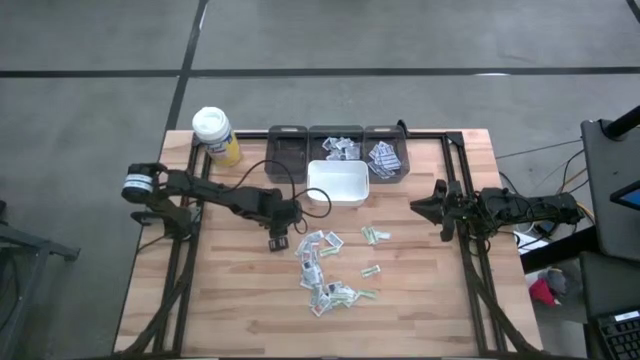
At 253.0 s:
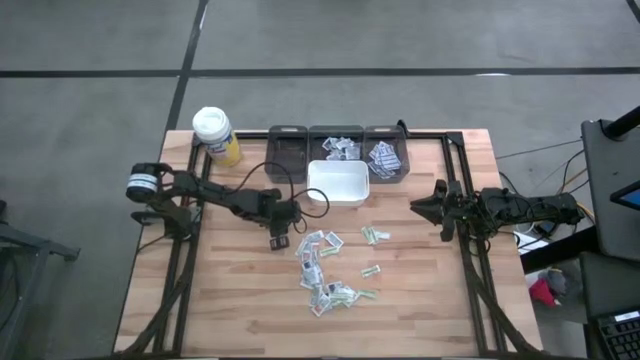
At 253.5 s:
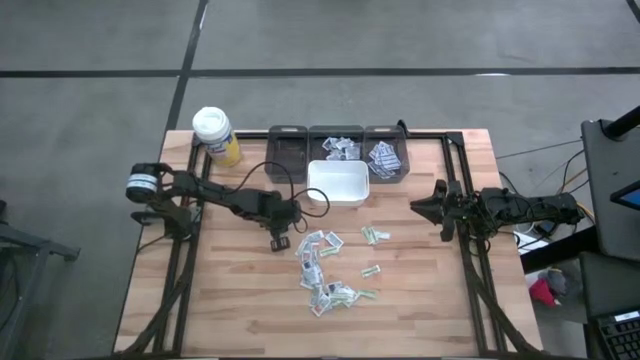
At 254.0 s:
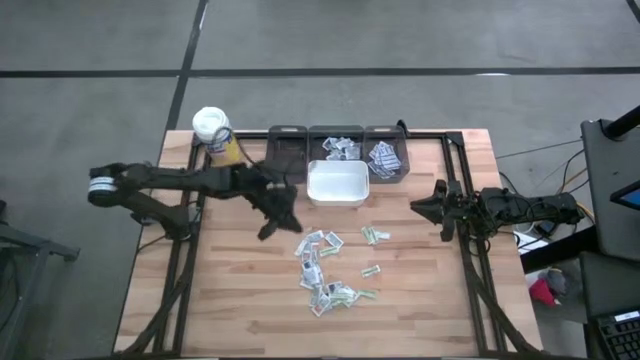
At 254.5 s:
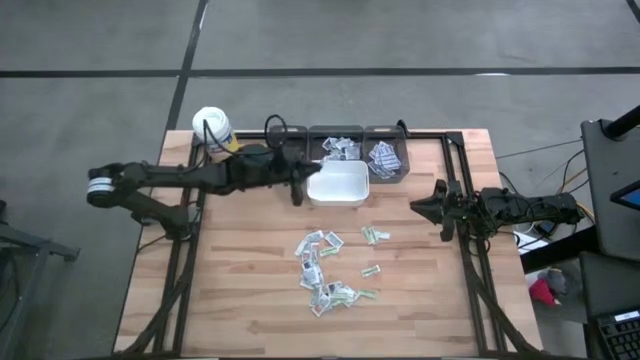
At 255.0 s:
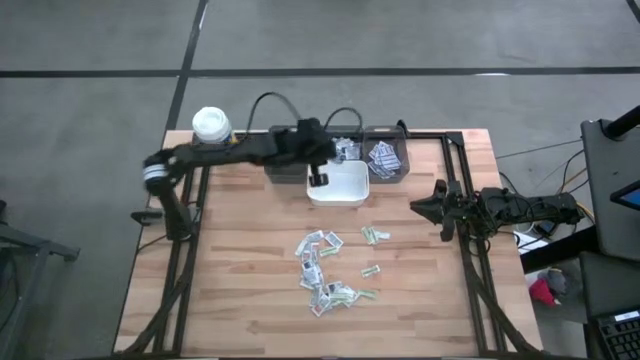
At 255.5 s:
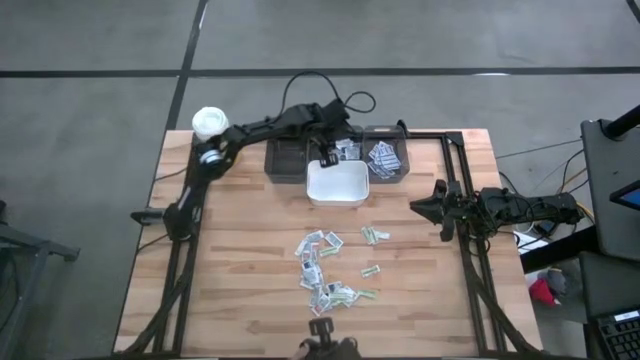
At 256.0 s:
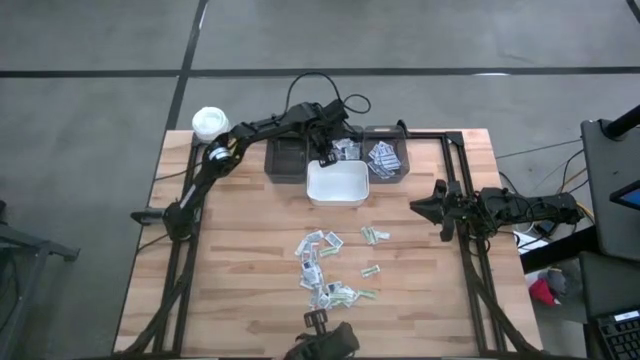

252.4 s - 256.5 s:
Task: Pick & Place First Aid Supplies
Put the alcohol pad into the middle black bin

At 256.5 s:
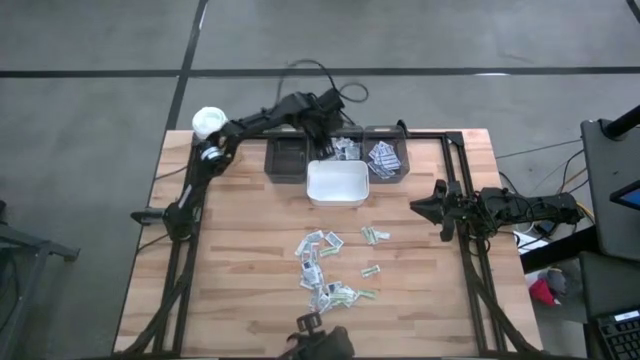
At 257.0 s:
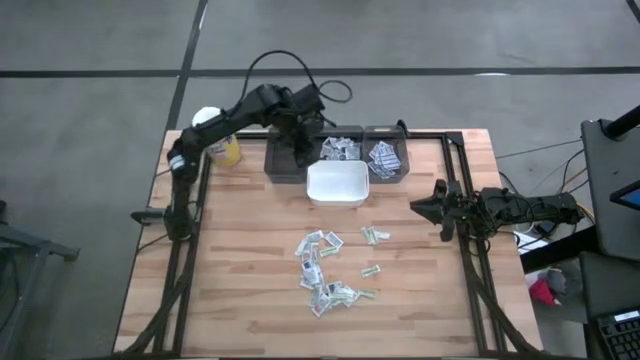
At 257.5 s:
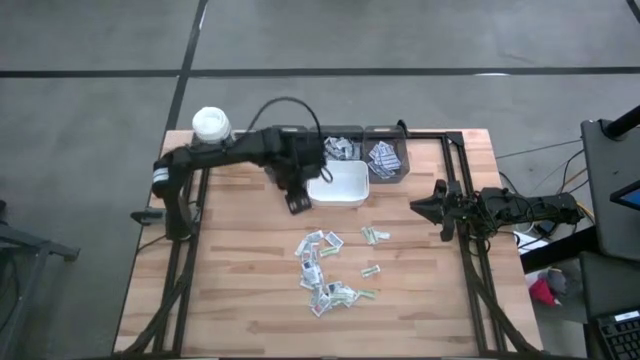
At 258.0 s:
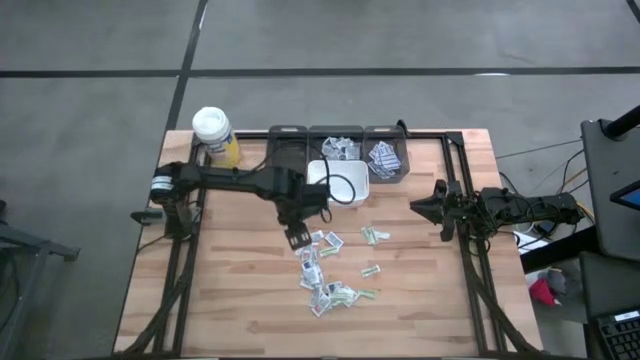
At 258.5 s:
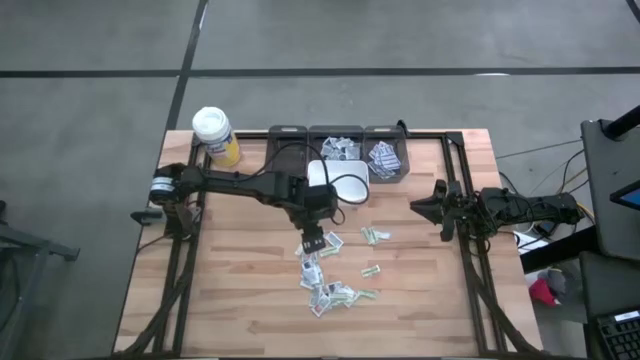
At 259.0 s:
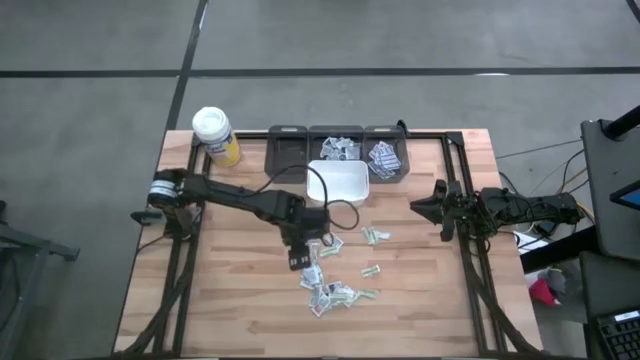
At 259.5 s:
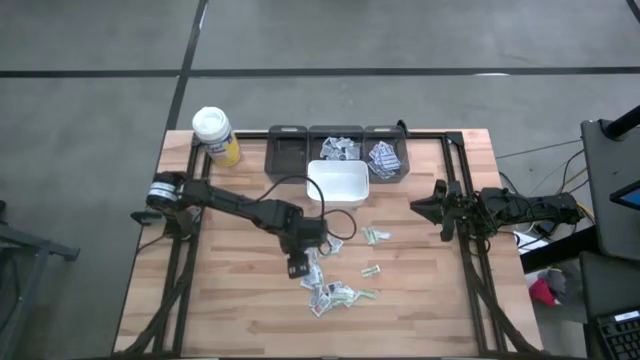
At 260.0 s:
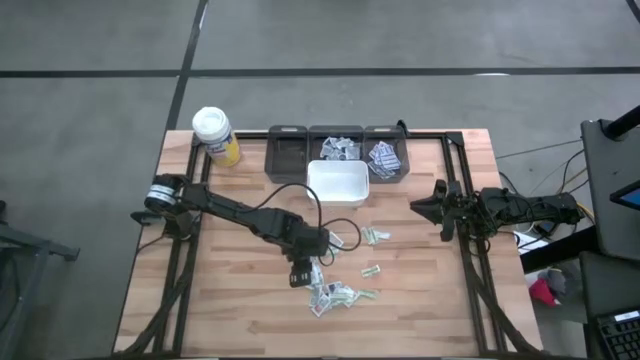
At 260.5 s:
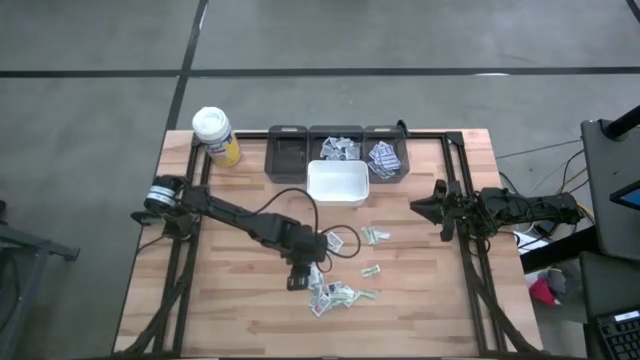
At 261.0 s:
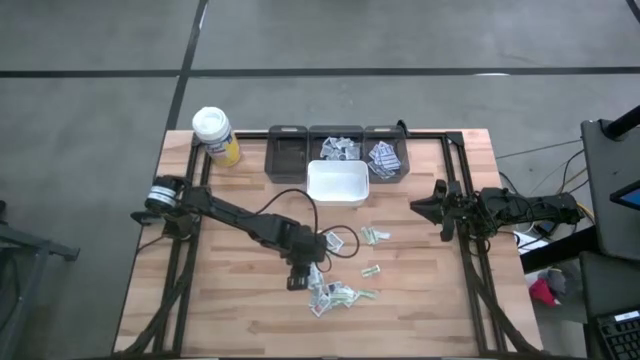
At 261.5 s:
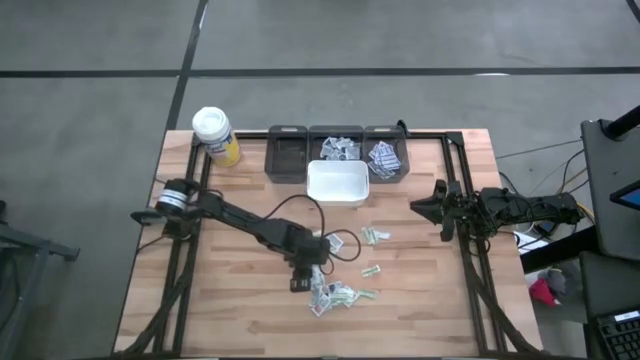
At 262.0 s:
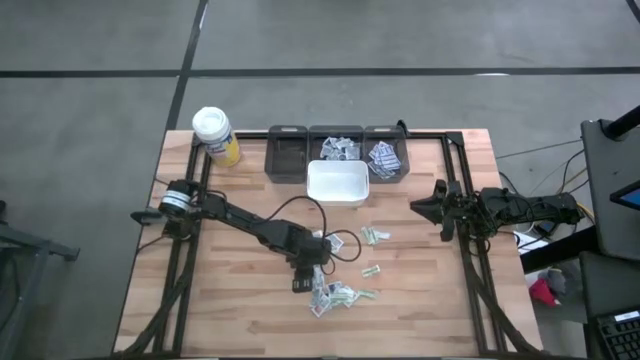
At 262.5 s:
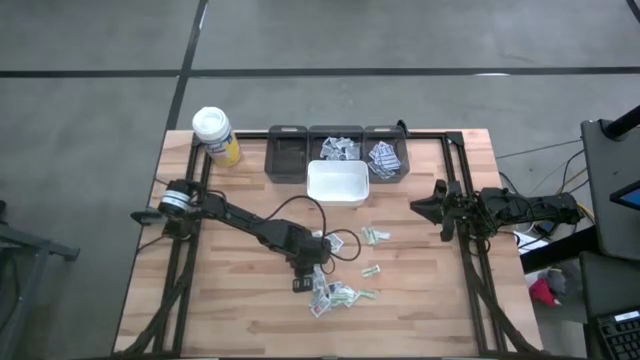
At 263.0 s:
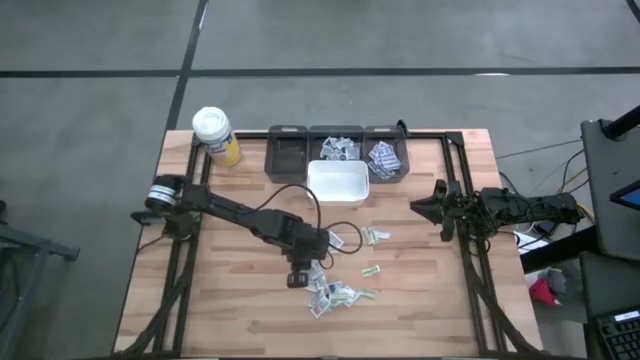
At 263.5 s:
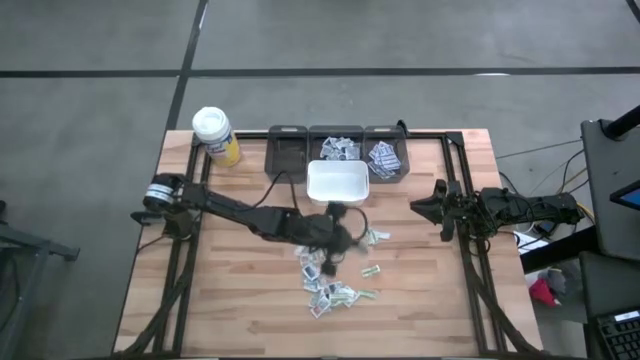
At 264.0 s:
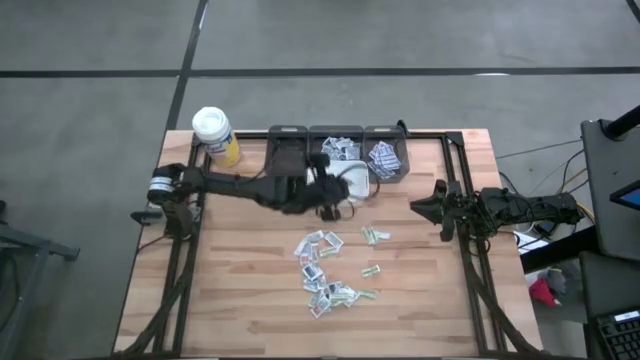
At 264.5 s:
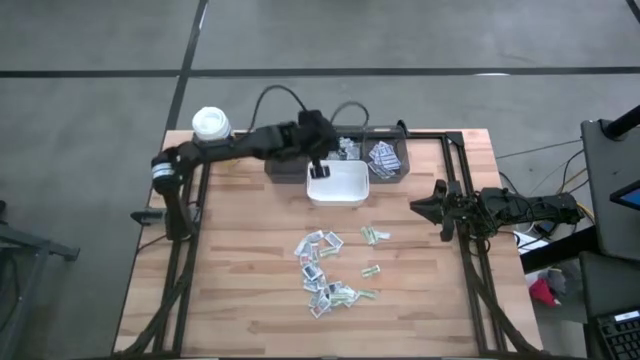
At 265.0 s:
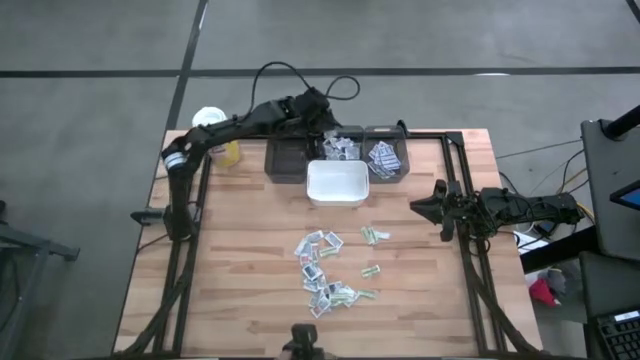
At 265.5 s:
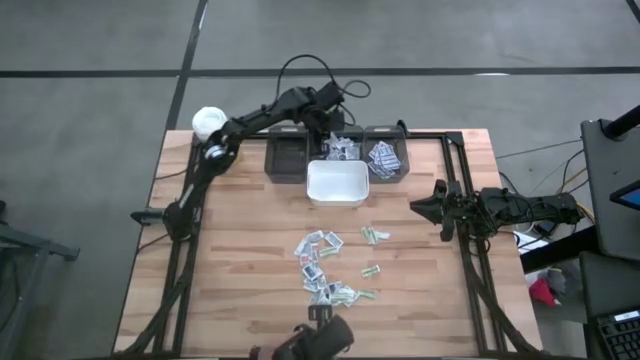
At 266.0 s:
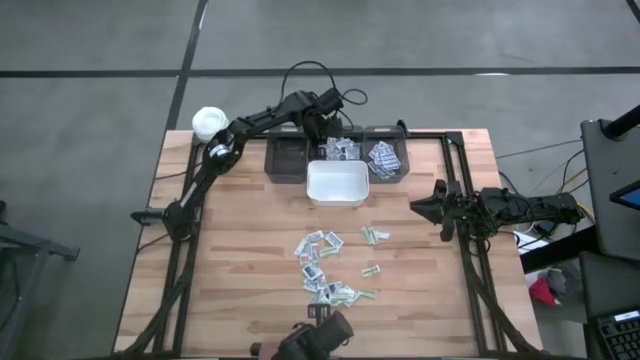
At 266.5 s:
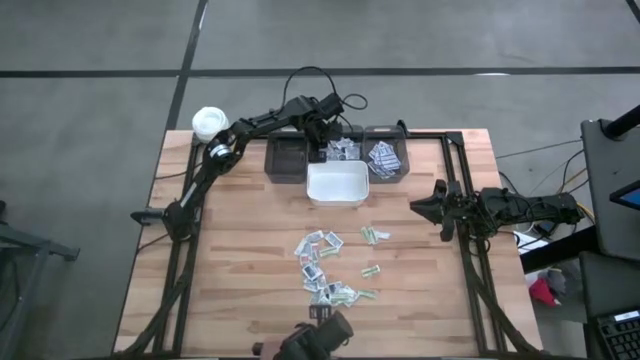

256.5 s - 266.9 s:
Put the alcohol pad into the middle black bin

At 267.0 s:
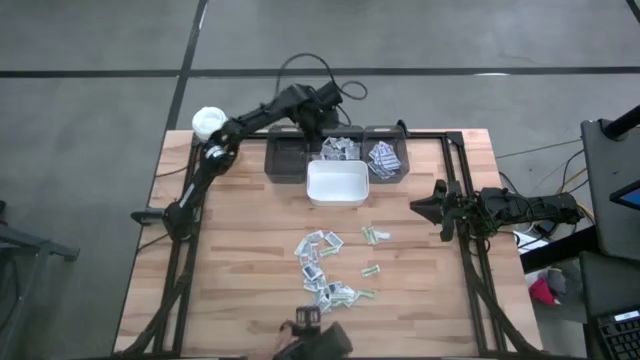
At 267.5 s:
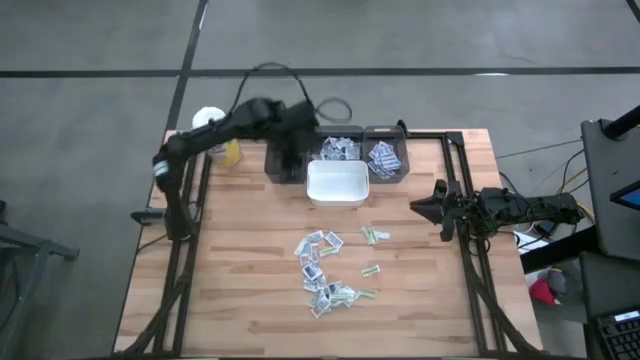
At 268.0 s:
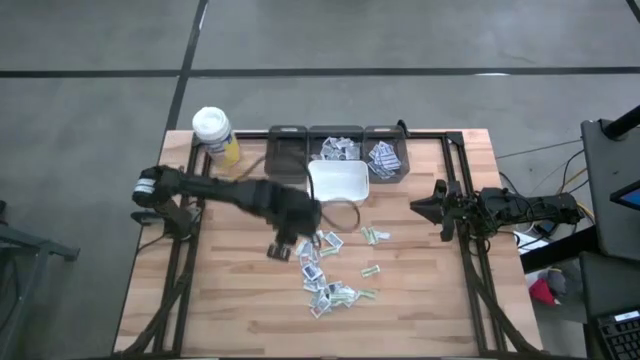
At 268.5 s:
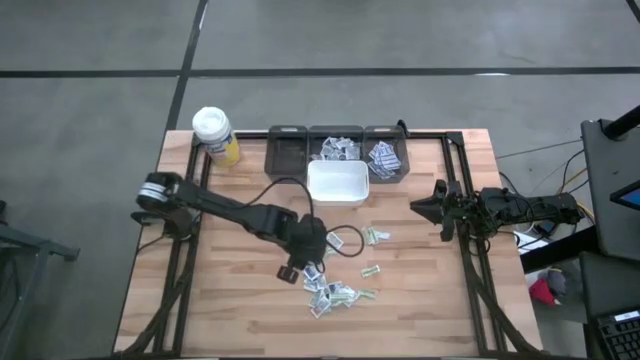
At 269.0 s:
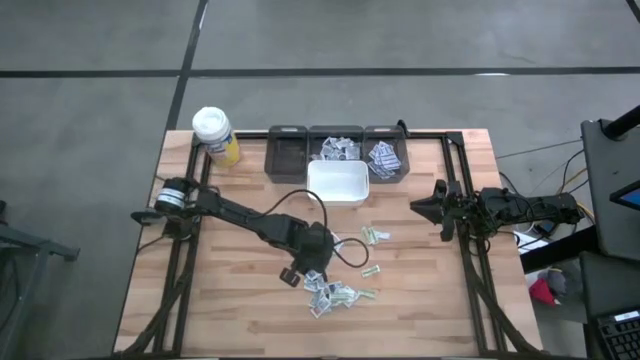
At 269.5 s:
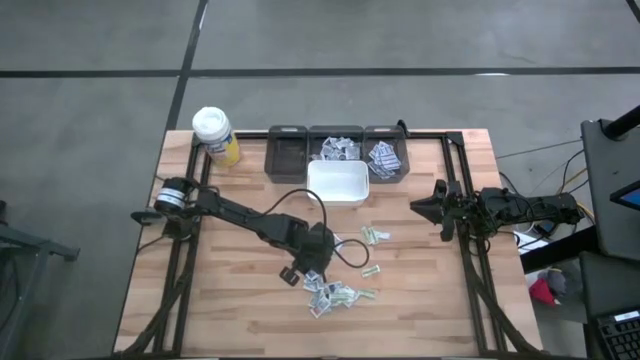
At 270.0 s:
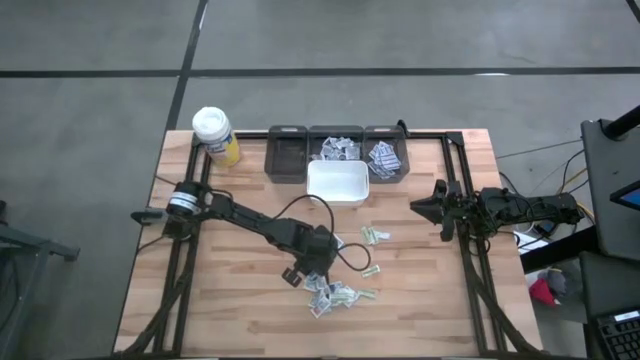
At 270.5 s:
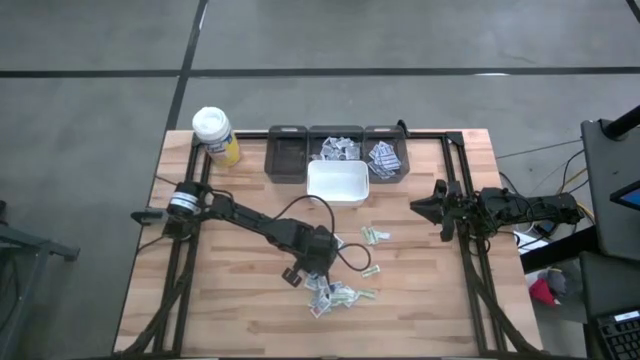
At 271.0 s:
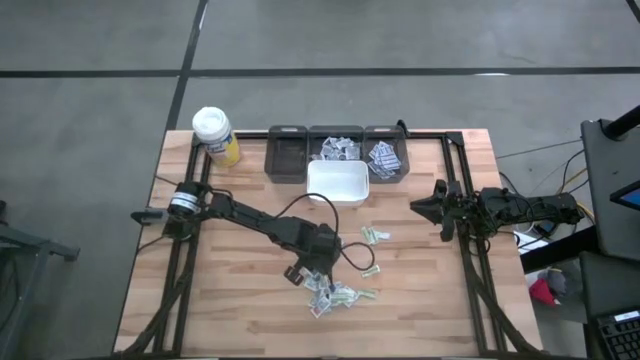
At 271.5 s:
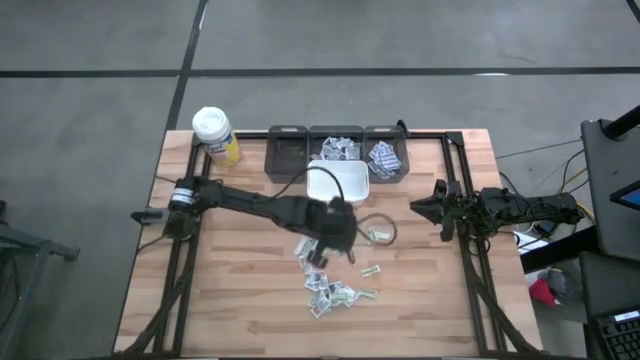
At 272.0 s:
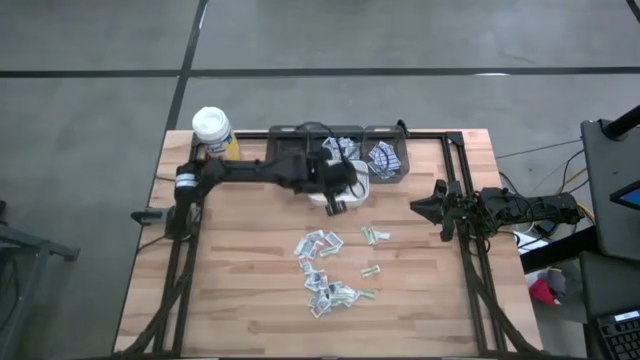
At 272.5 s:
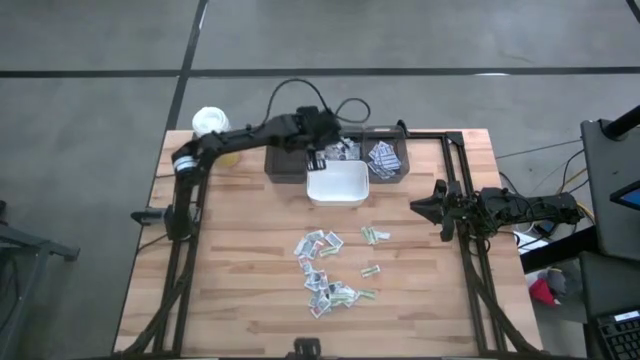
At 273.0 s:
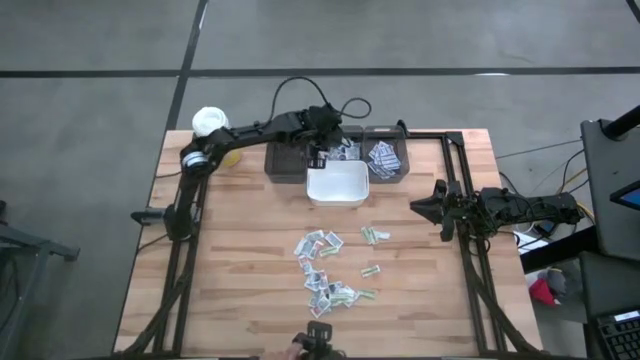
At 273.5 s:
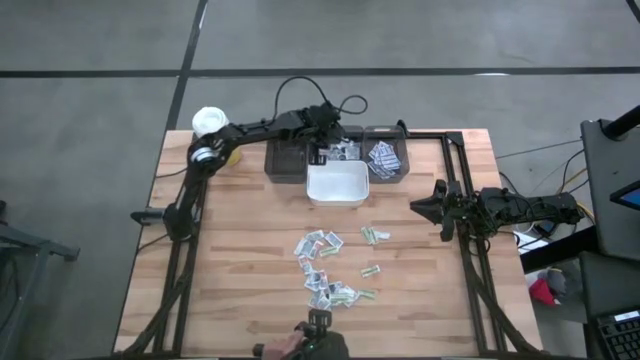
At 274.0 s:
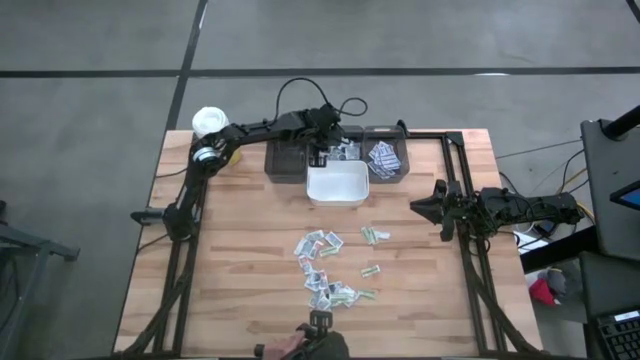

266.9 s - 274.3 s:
Put the alcohol pad into the middle black bin
